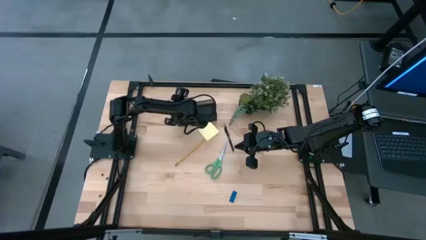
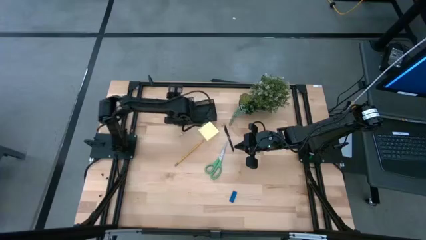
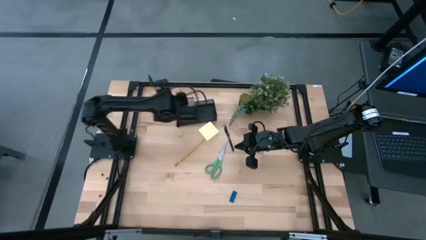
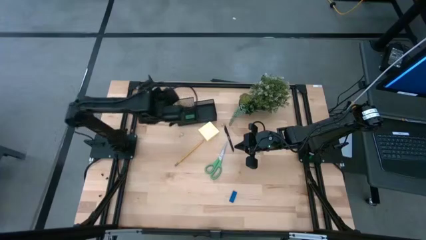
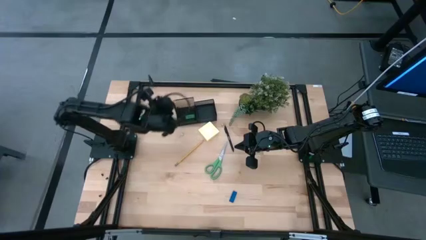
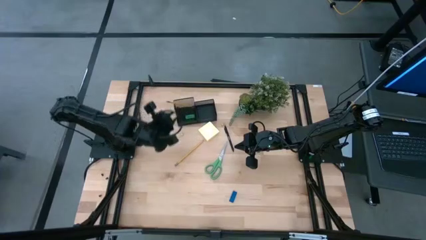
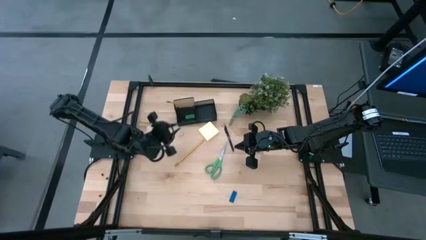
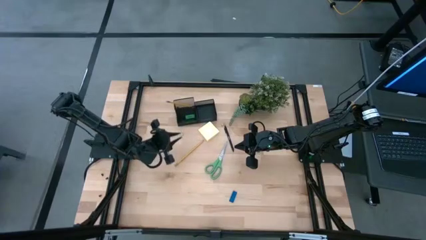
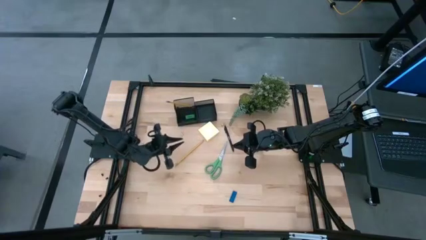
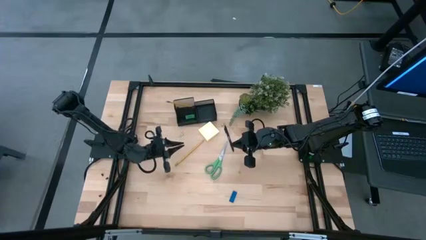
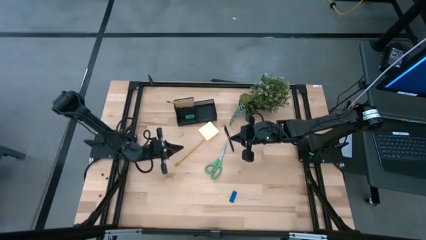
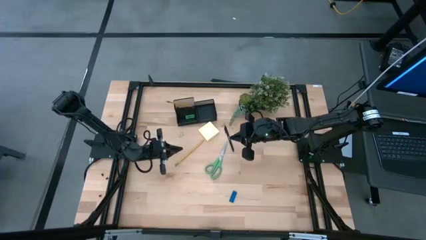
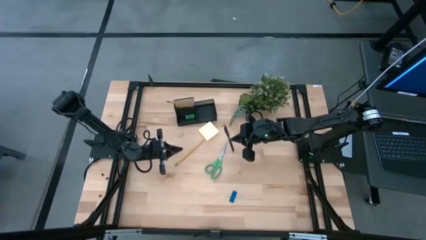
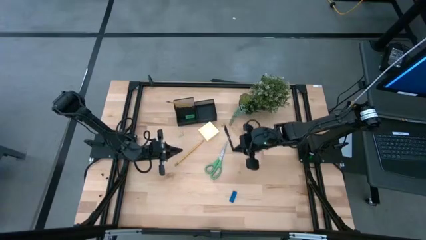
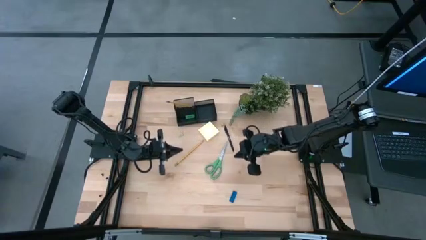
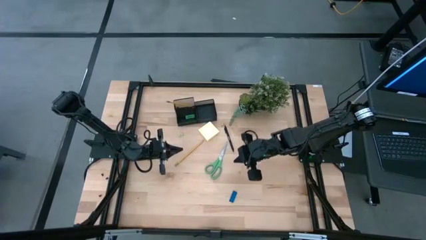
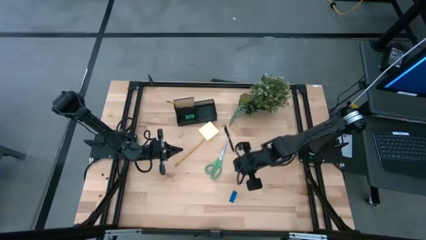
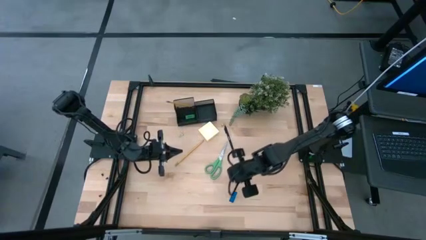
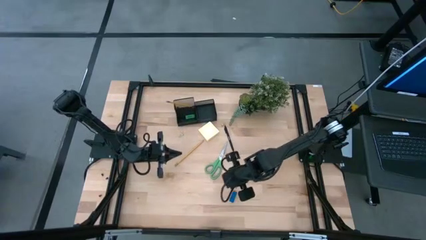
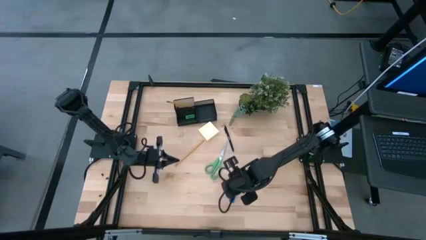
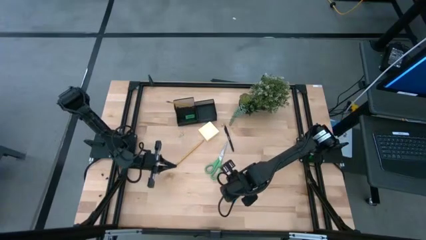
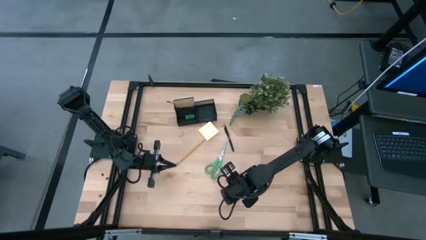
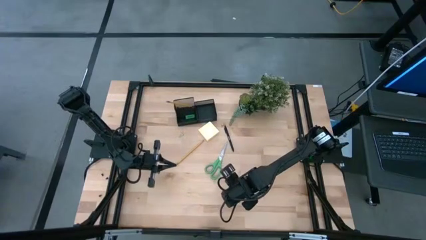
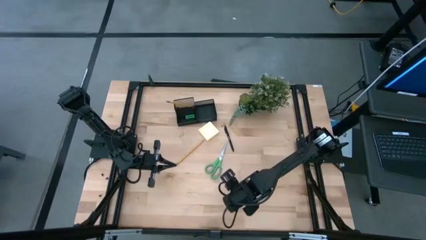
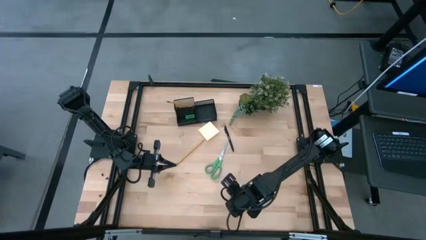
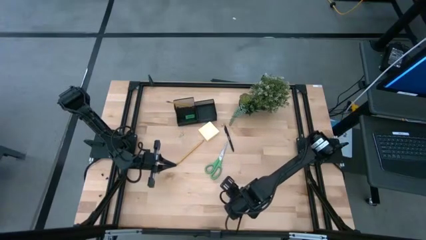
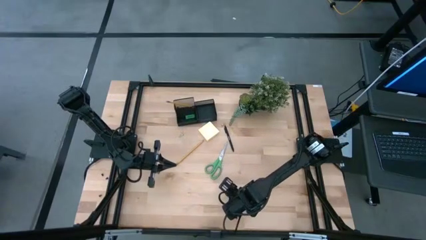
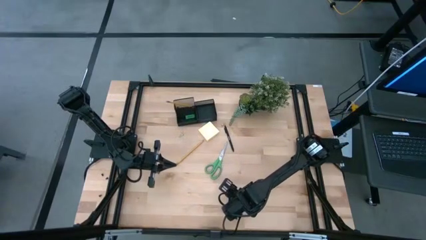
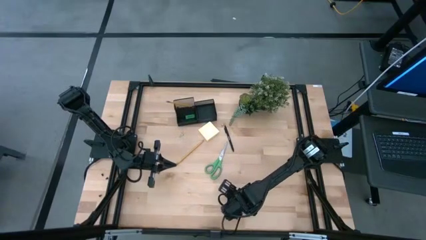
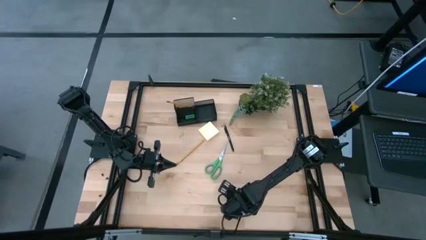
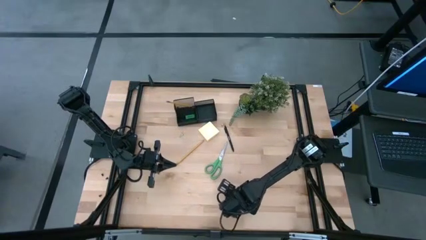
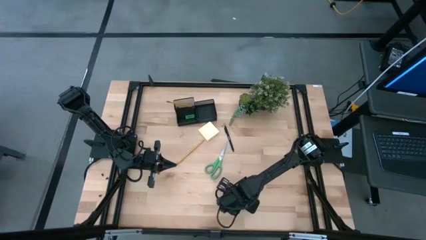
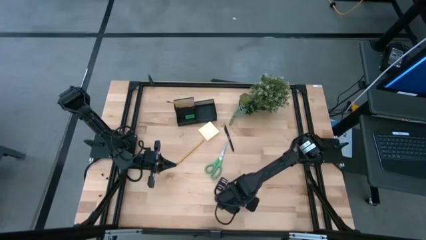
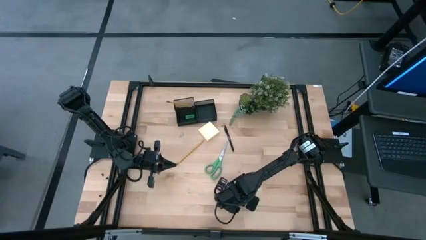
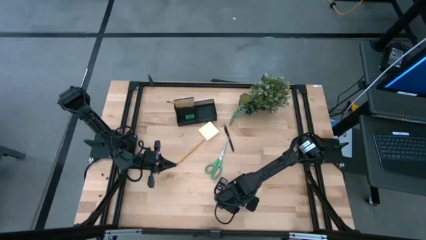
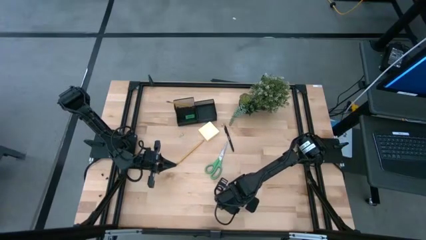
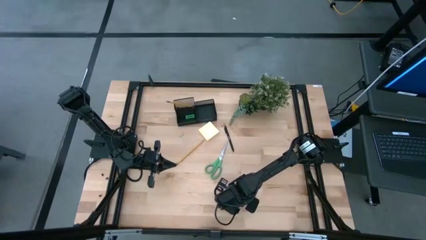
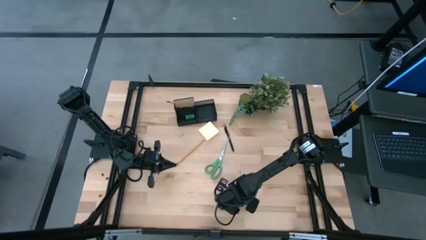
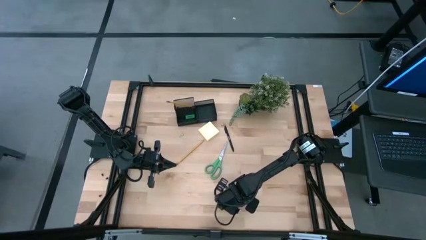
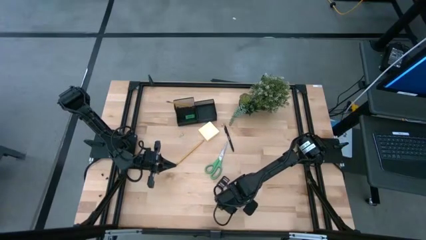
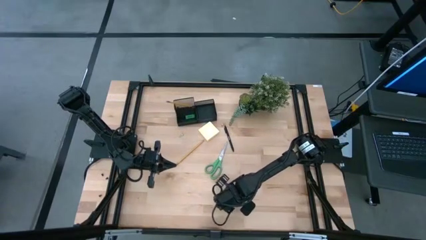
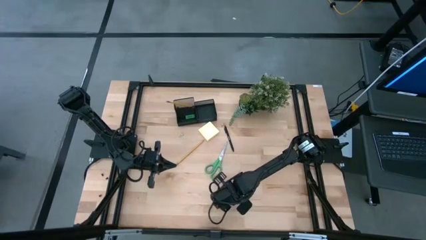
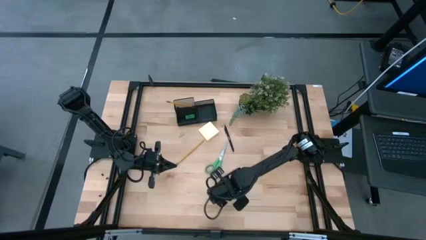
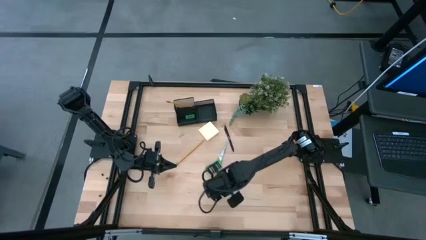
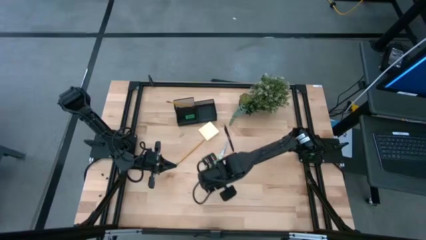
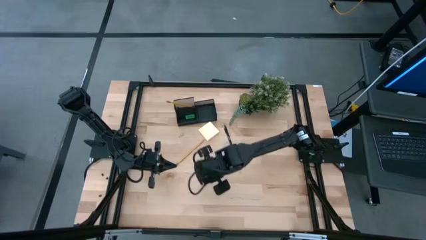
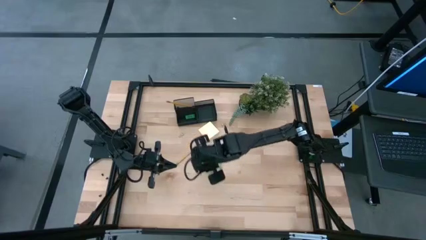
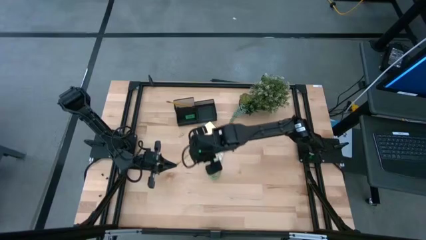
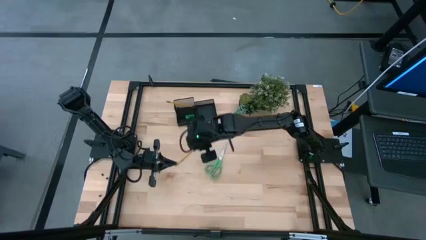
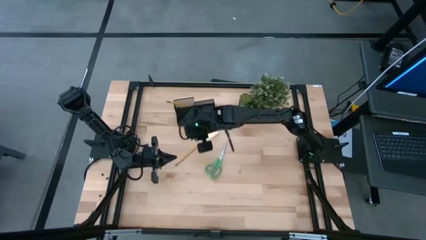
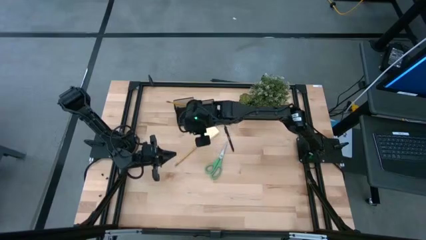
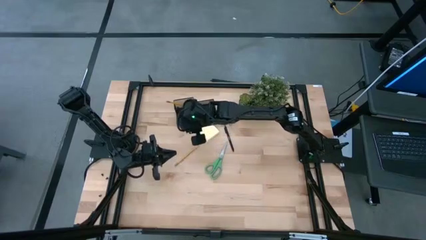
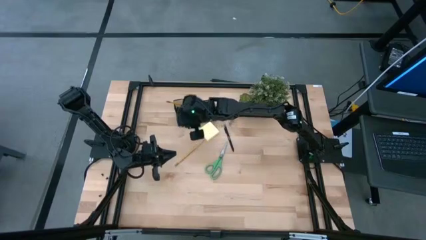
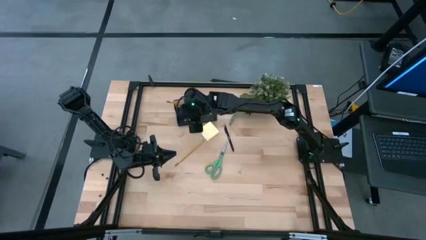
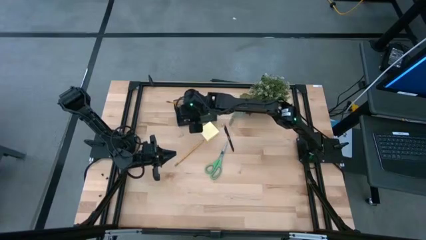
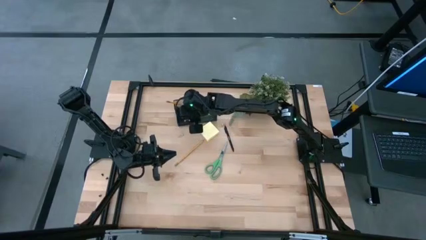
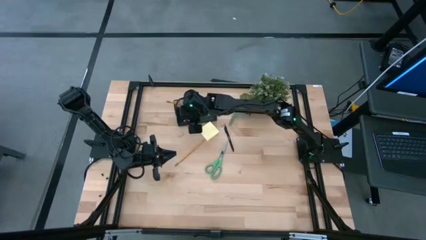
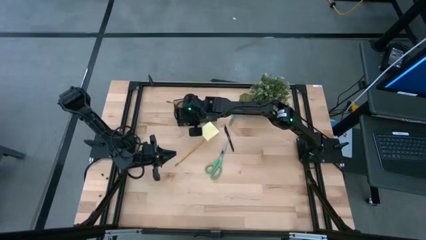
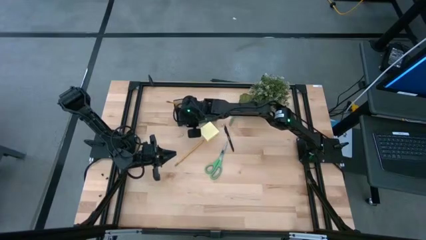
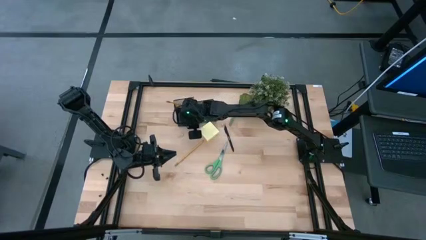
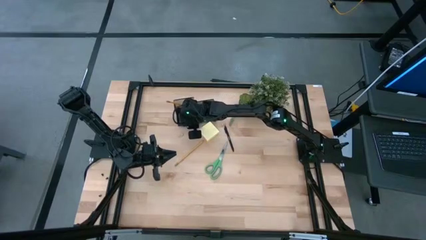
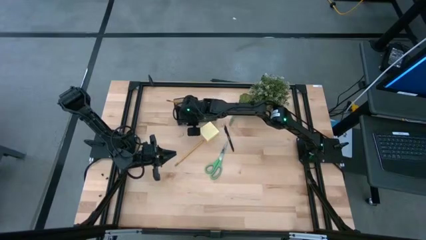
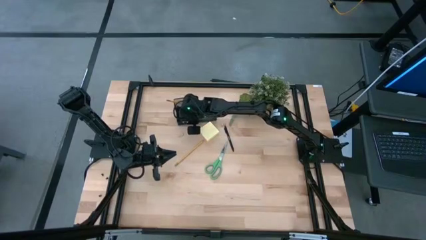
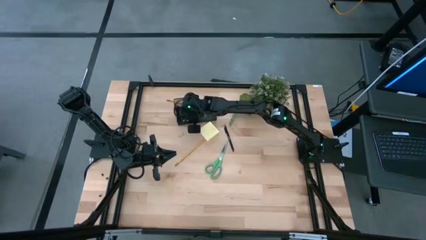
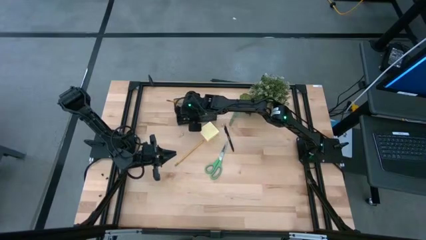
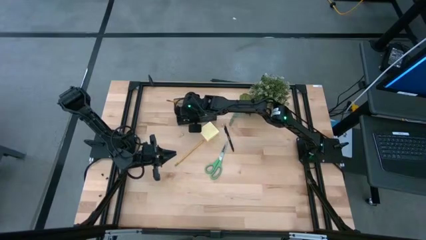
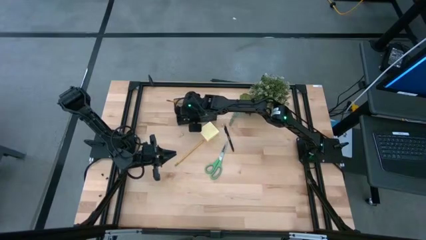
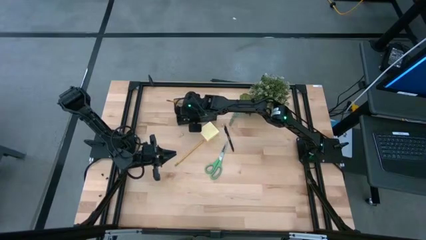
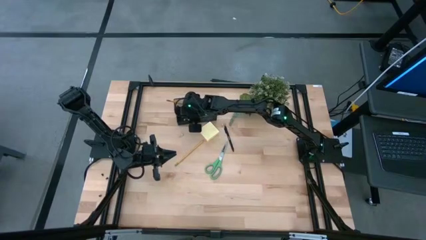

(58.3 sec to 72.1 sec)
Task: Pick and place office supplies into organizer
Put the blue eraser into the black desk organizer
